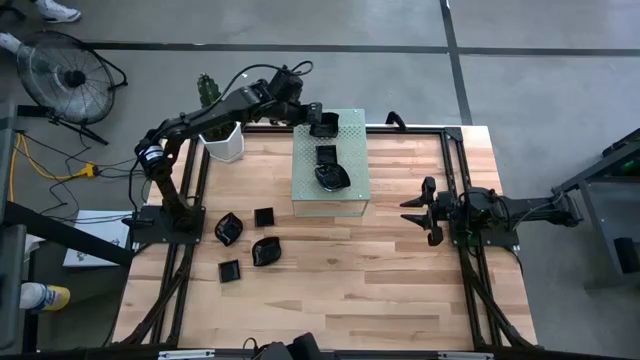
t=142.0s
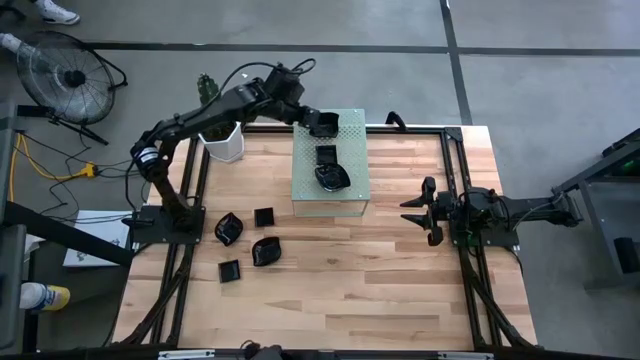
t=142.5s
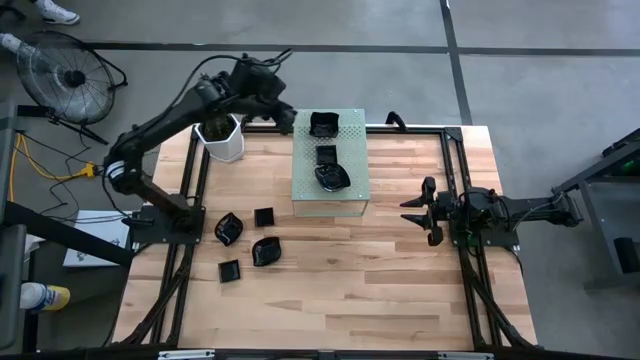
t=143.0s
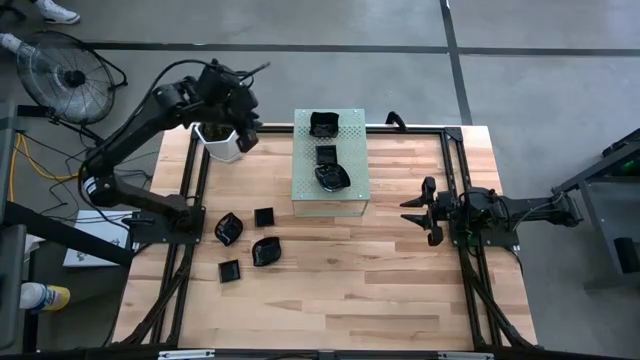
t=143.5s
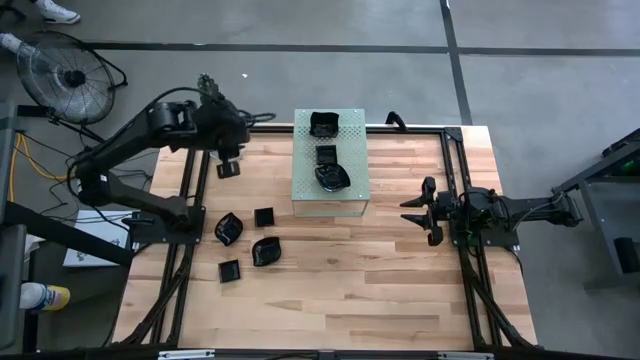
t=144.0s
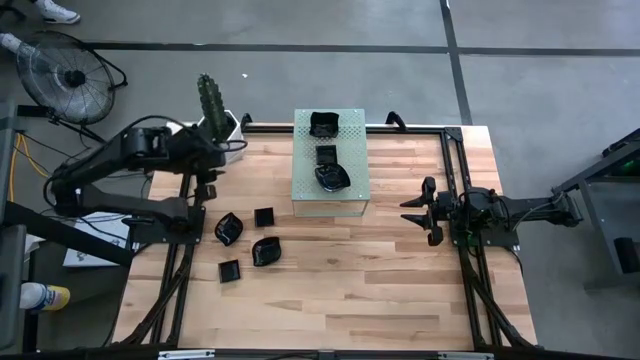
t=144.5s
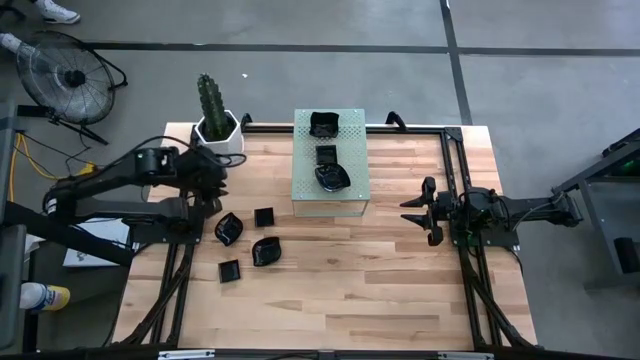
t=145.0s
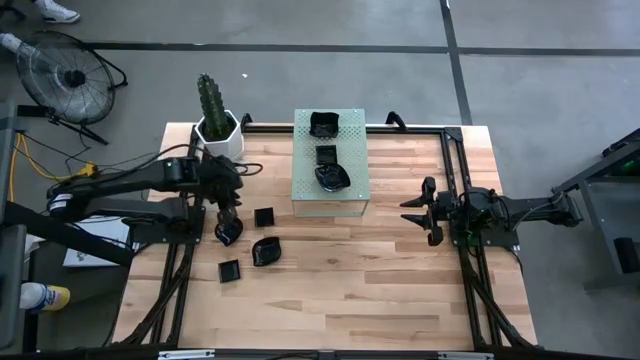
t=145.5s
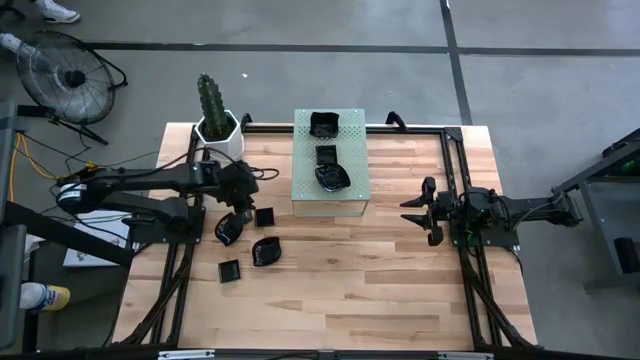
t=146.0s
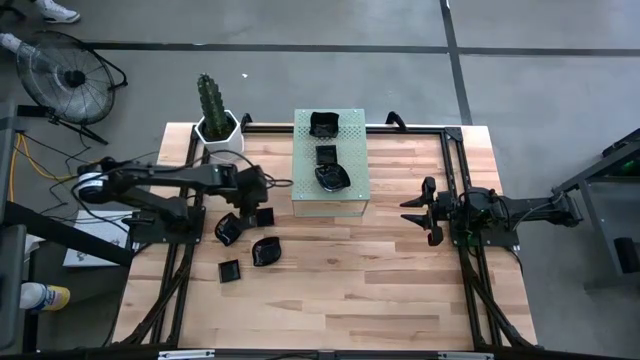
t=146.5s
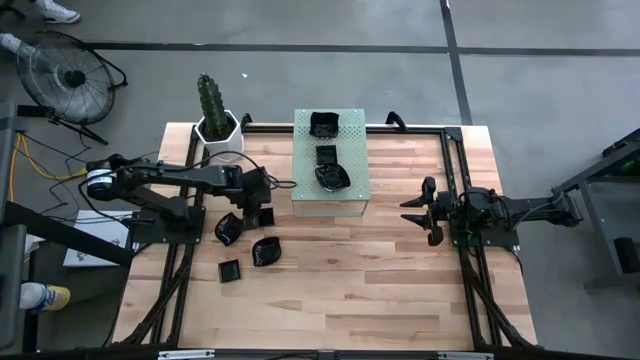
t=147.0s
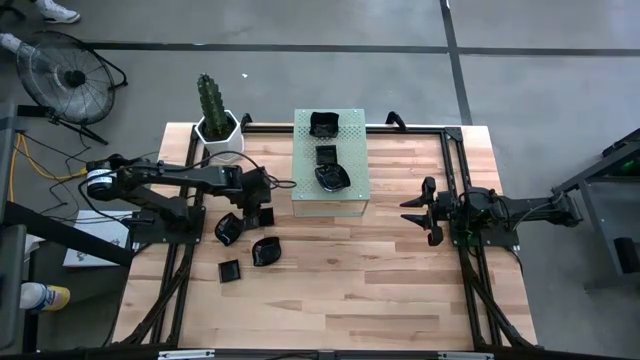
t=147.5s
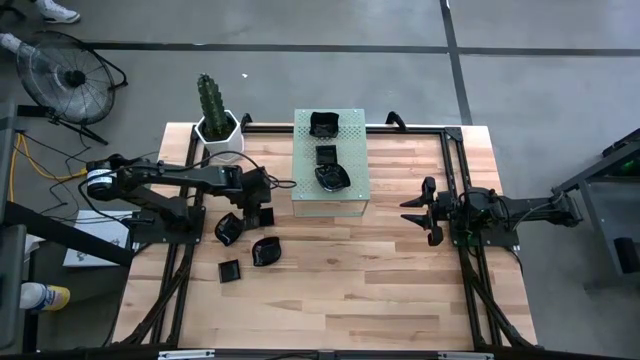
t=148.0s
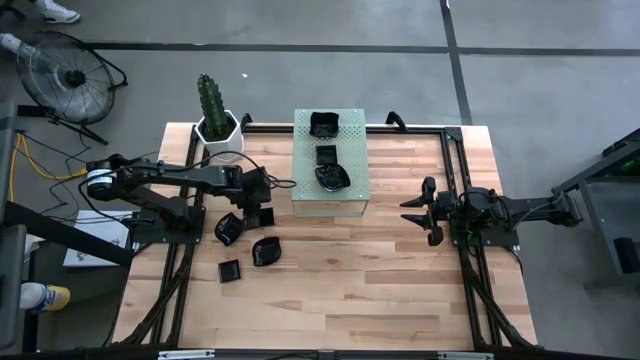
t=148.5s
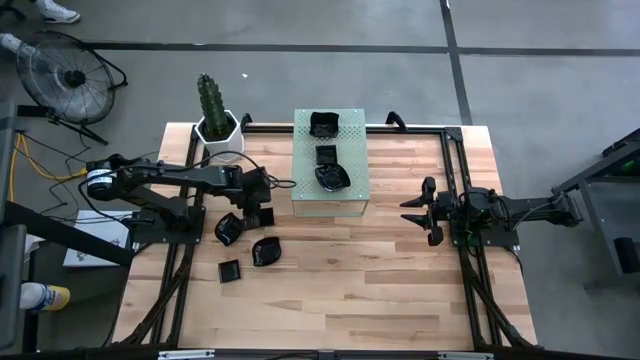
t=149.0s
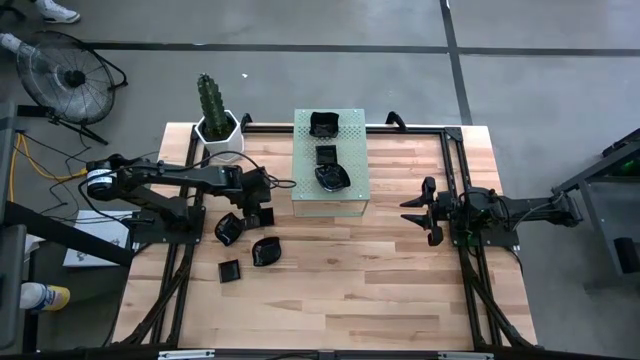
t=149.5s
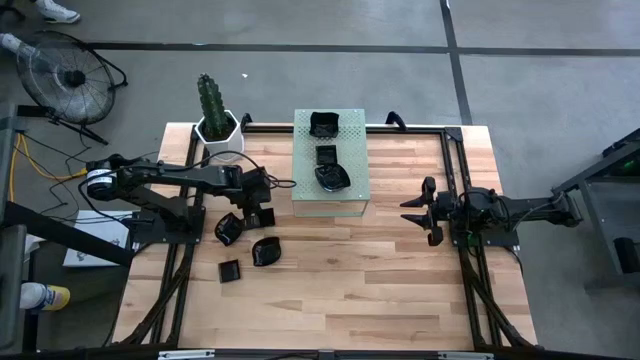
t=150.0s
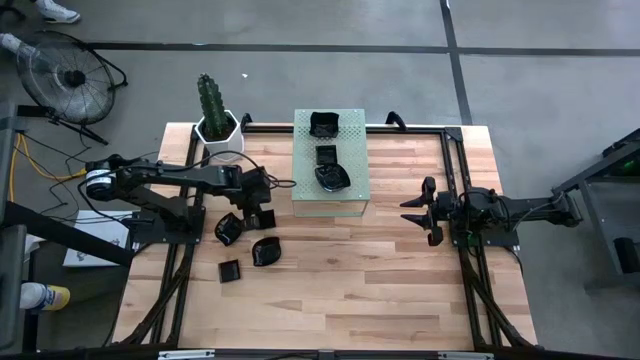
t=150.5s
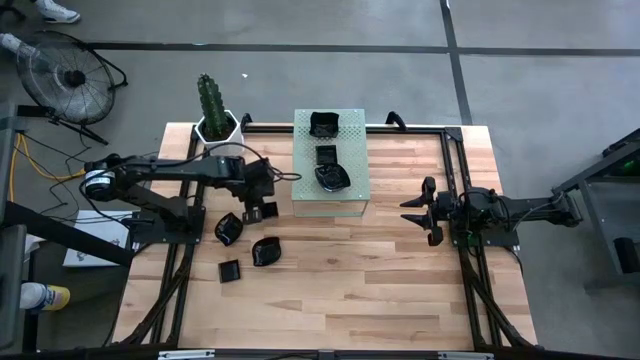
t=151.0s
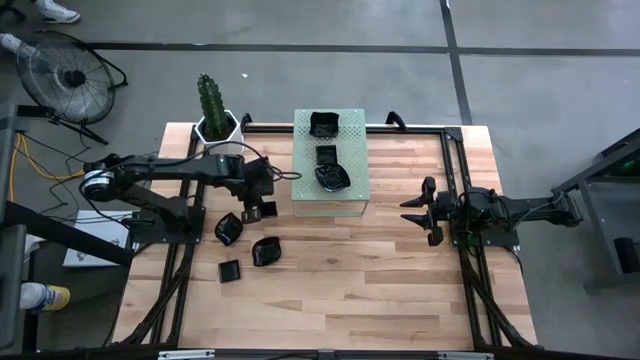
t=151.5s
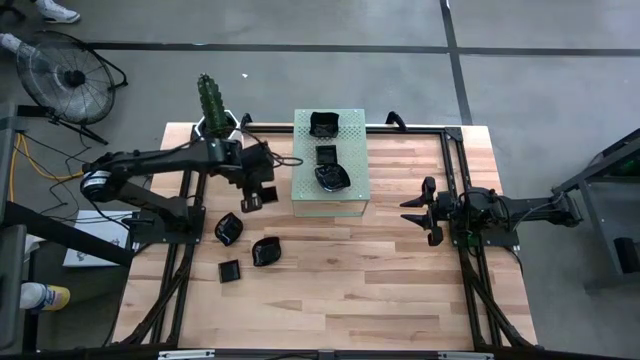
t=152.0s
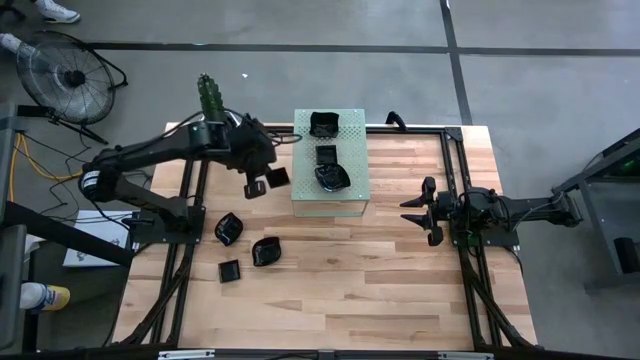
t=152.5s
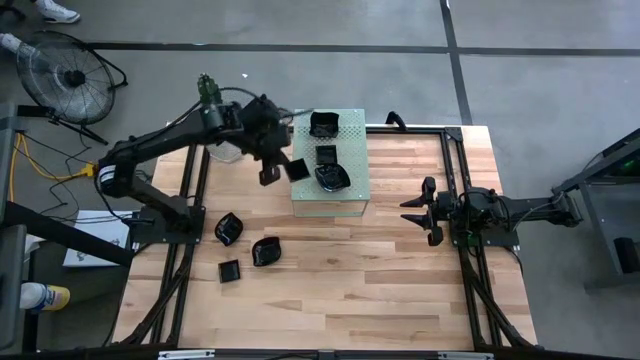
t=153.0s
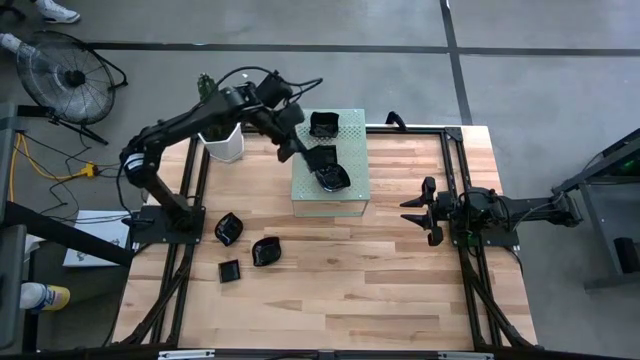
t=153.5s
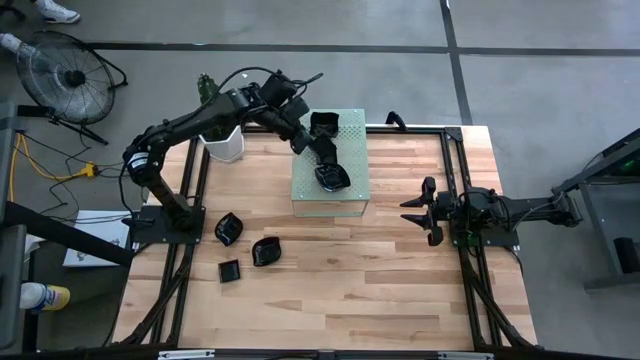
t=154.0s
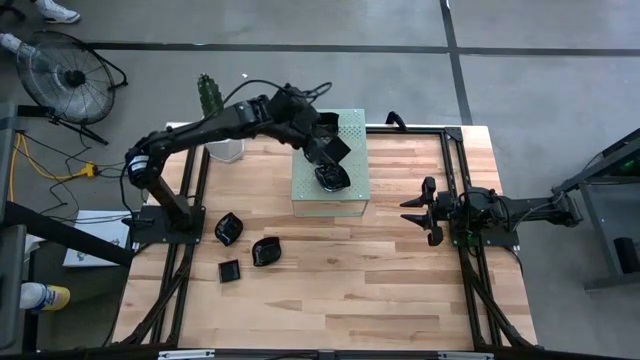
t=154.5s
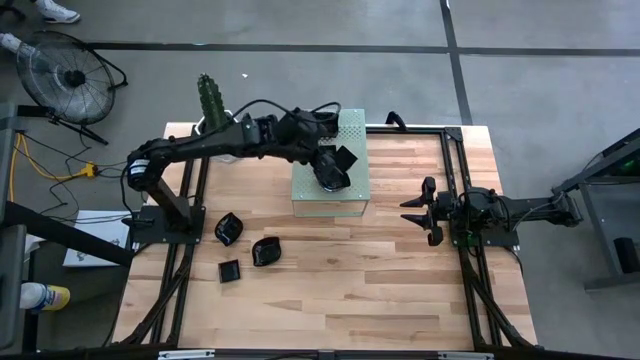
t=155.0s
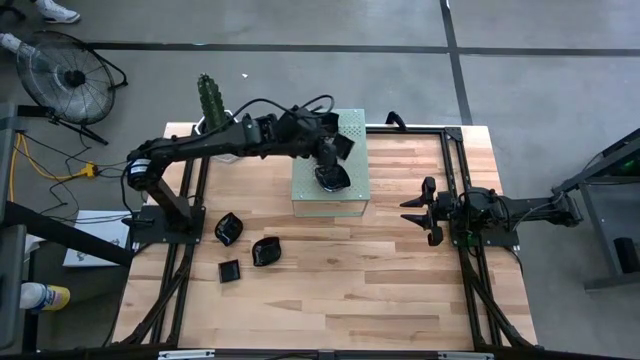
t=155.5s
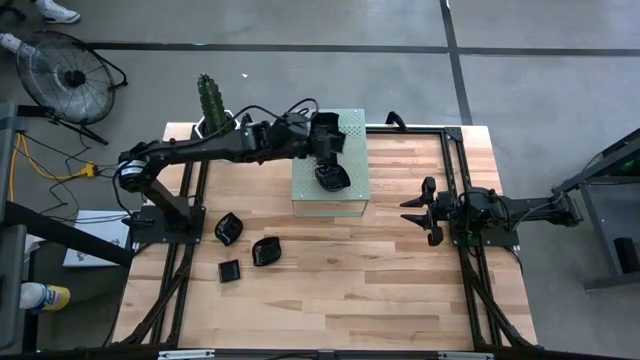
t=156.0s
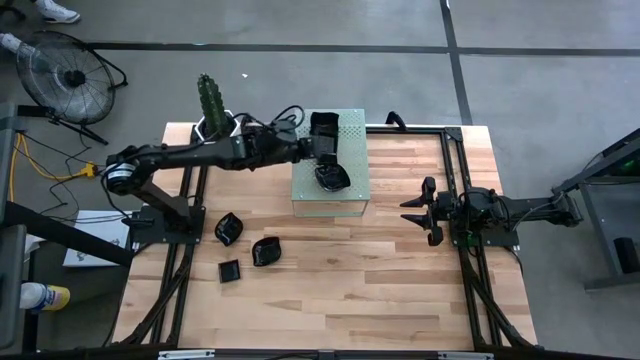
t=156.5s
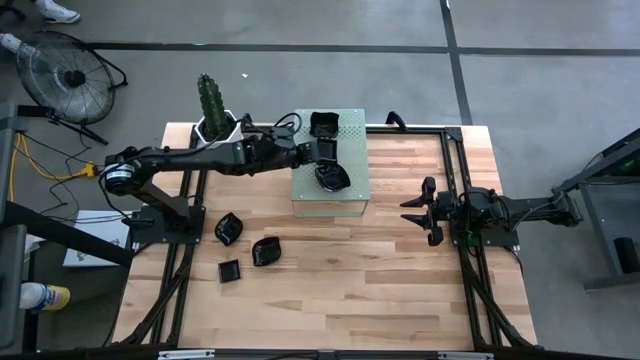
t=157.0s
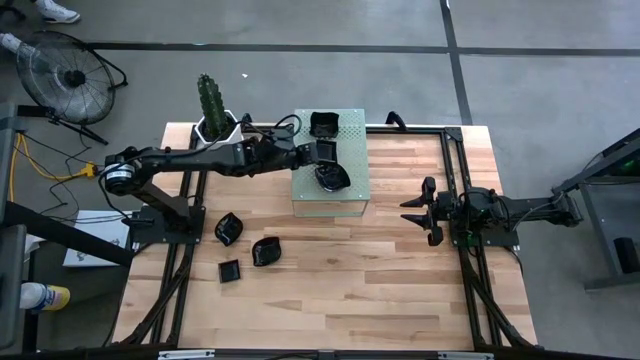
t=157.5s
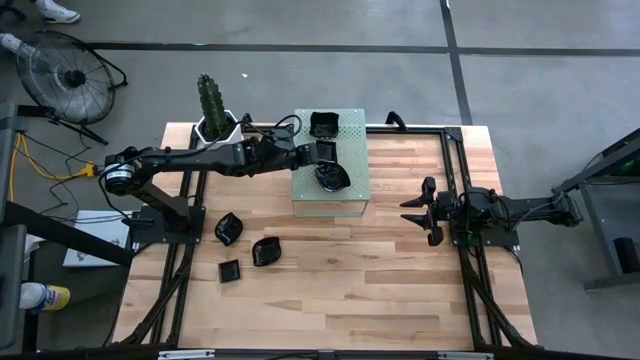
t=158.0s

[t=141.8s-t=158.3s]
Task: Pick & Place Mini shaped plates
Stack the black square plate on top of the black square plate on the shelf

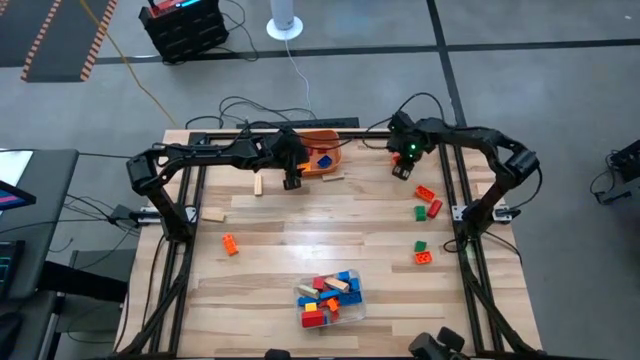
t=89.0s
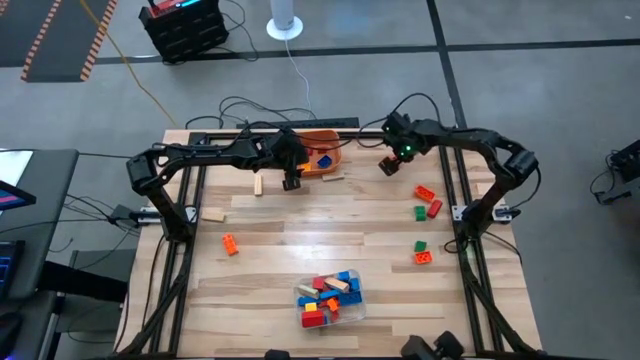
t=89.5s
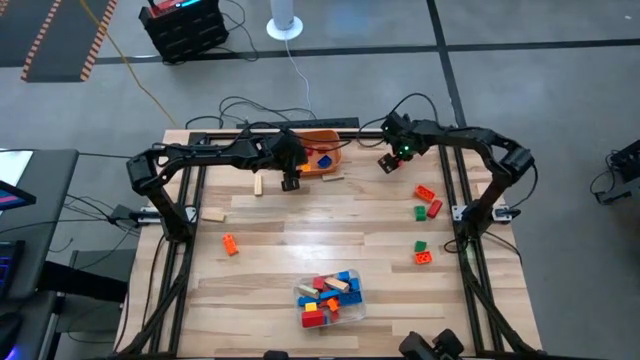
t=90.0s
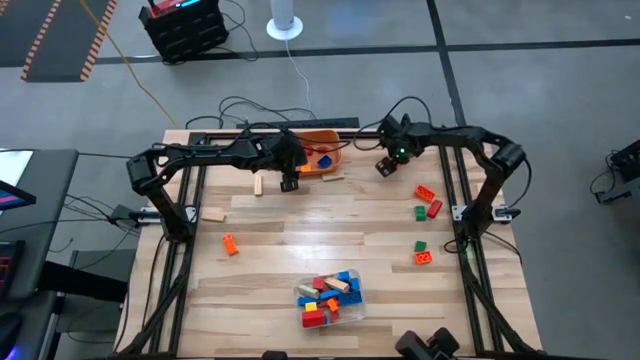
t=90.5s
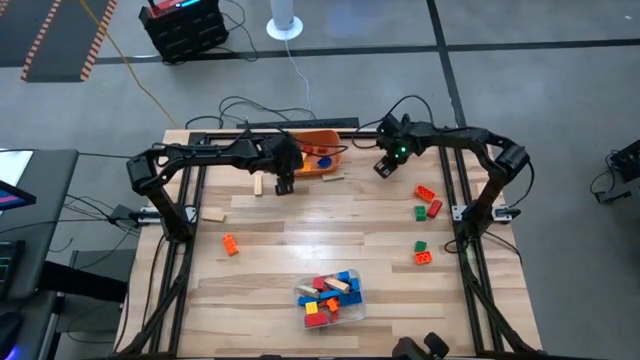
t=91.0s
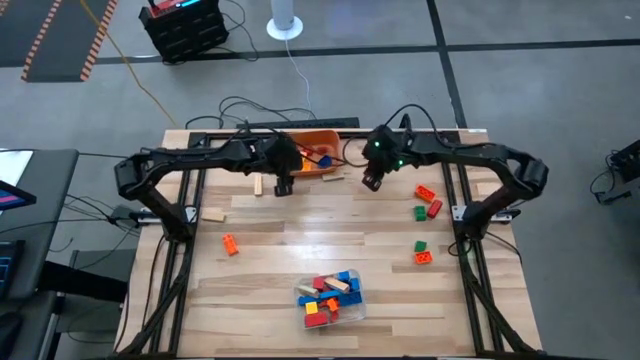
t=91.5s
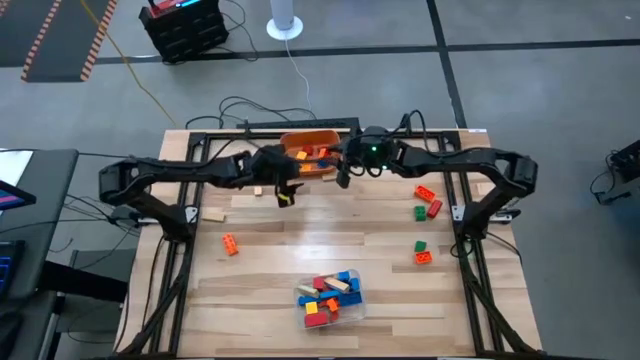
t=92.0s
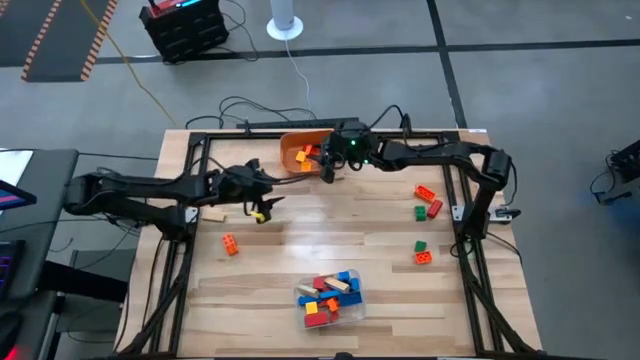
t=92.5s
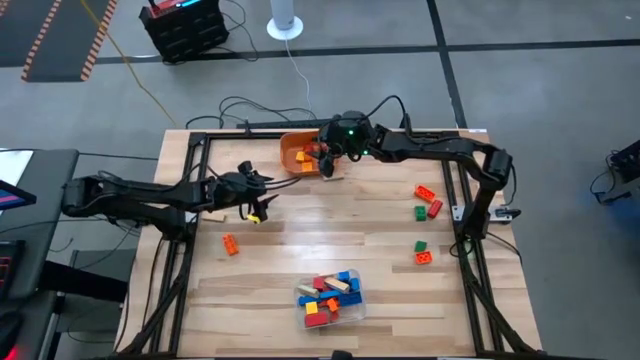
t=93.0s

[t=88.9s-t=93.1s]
Task: Sort blocks by size
Put the small orange game piece into the orange bin
